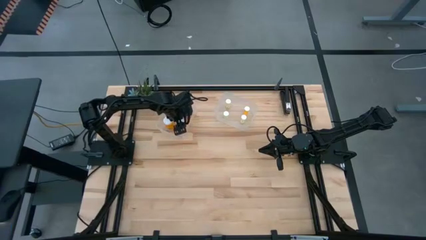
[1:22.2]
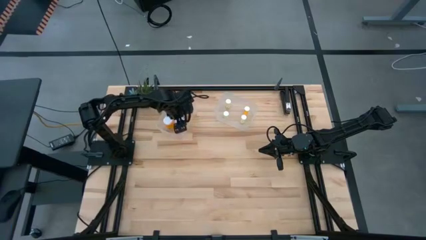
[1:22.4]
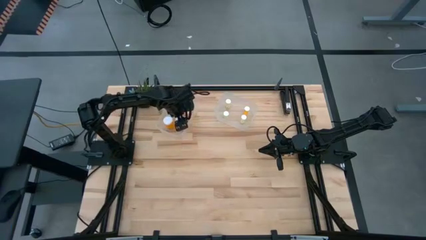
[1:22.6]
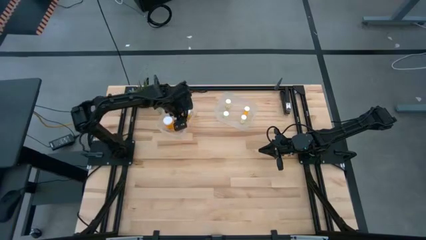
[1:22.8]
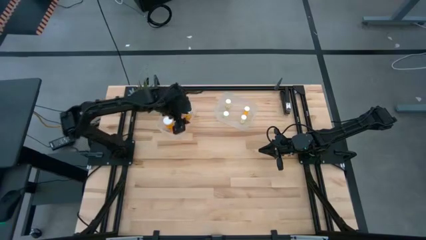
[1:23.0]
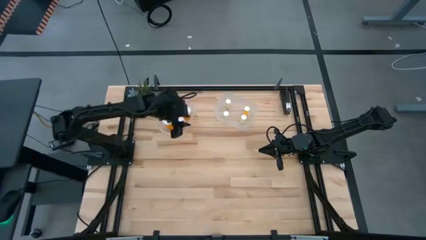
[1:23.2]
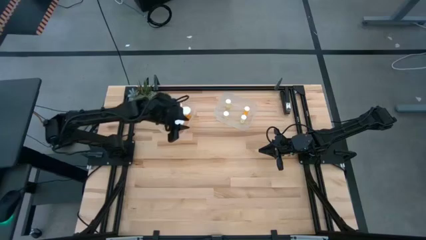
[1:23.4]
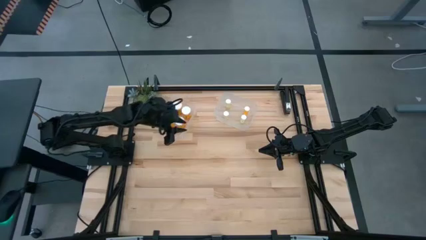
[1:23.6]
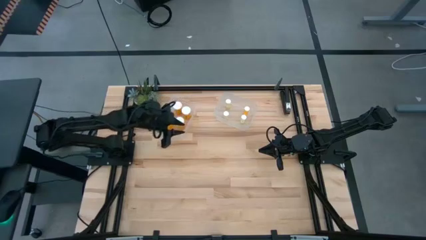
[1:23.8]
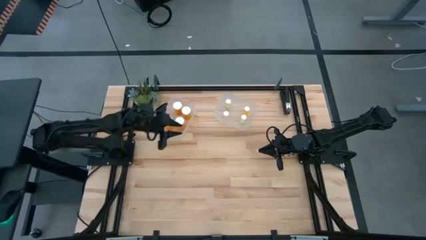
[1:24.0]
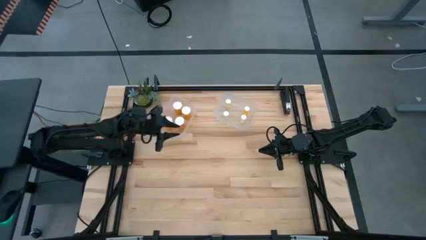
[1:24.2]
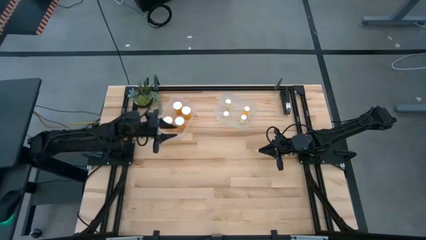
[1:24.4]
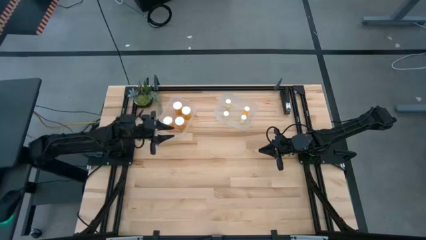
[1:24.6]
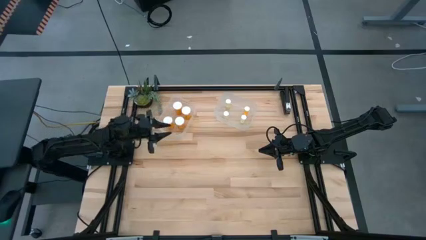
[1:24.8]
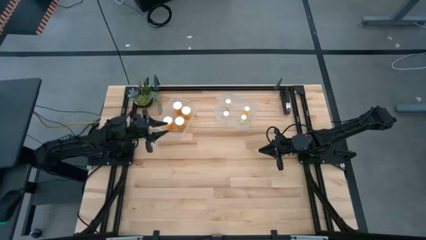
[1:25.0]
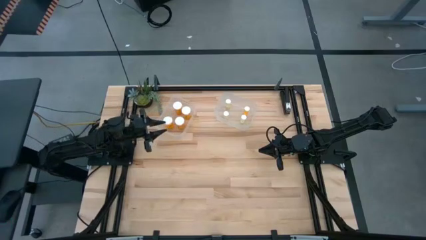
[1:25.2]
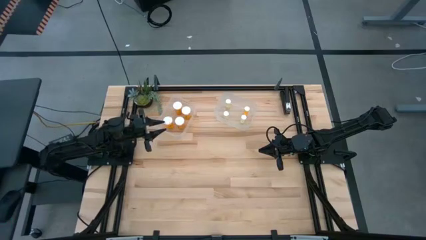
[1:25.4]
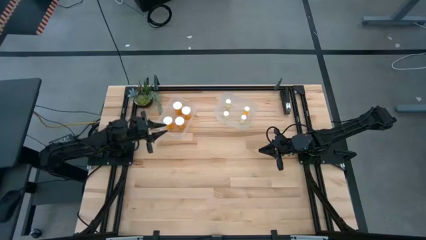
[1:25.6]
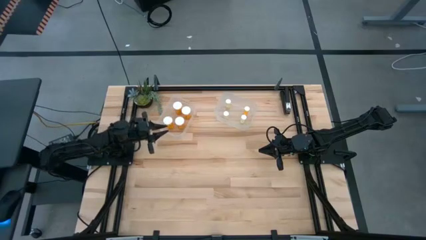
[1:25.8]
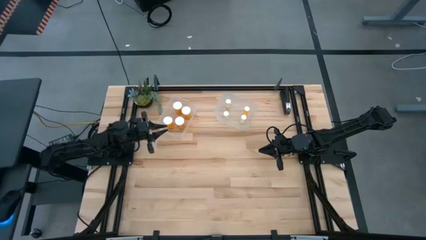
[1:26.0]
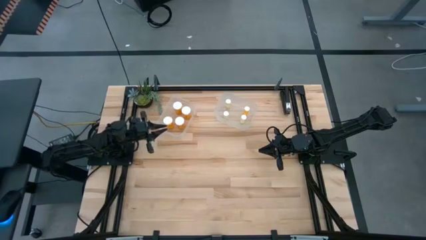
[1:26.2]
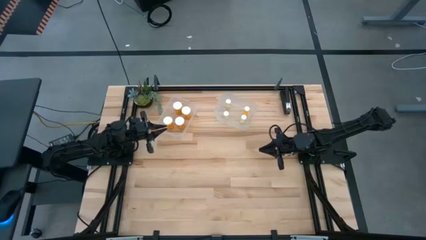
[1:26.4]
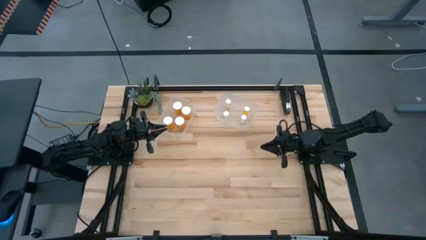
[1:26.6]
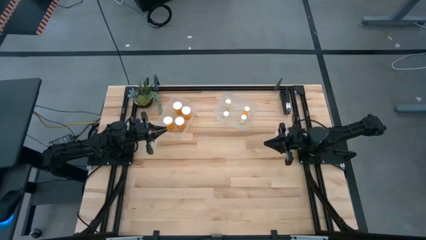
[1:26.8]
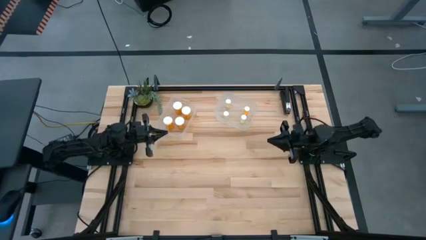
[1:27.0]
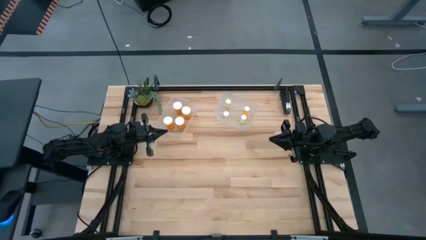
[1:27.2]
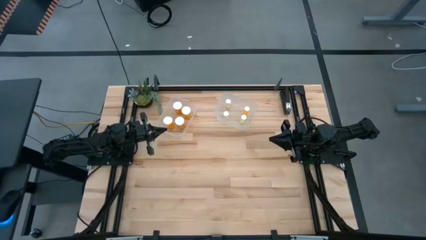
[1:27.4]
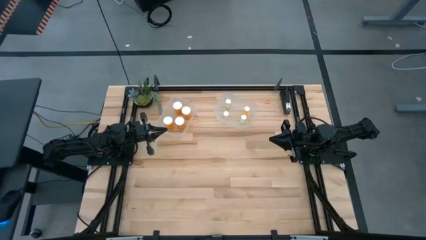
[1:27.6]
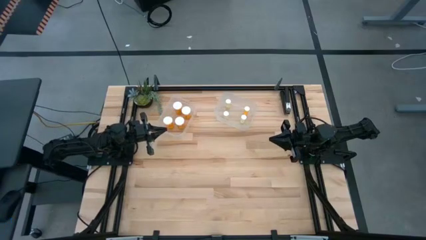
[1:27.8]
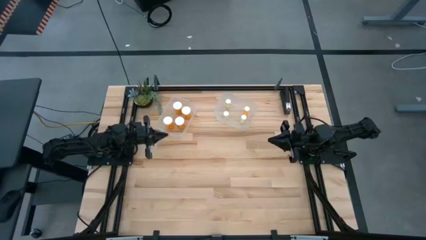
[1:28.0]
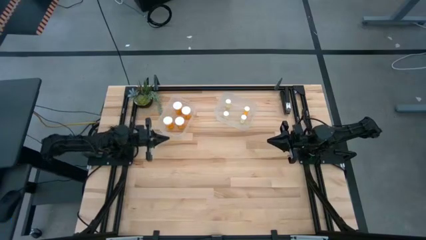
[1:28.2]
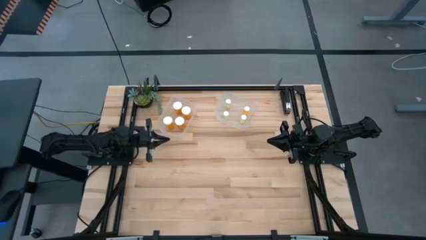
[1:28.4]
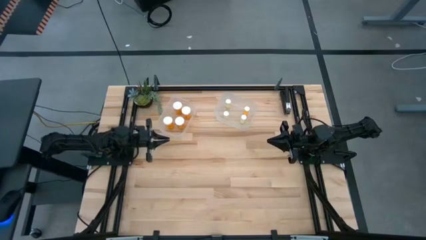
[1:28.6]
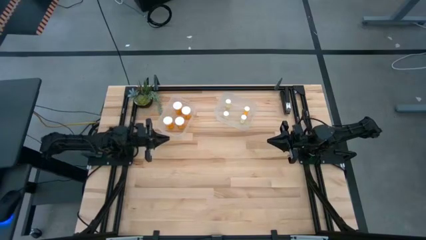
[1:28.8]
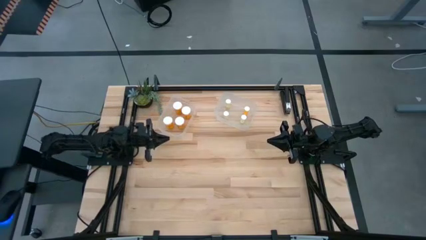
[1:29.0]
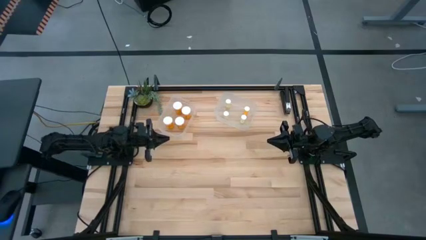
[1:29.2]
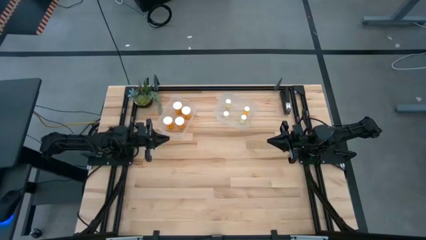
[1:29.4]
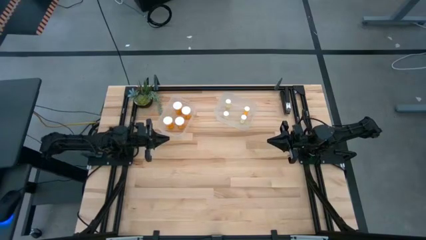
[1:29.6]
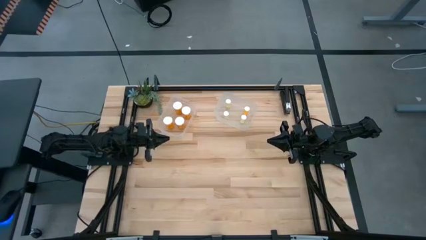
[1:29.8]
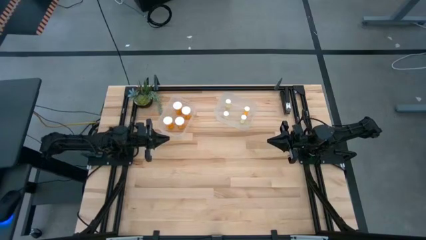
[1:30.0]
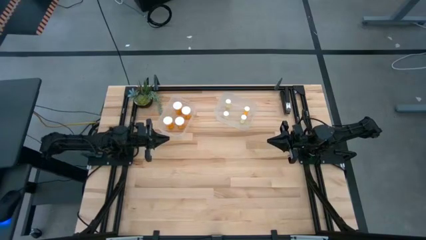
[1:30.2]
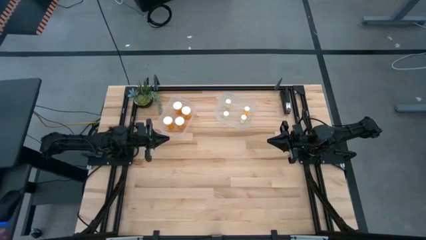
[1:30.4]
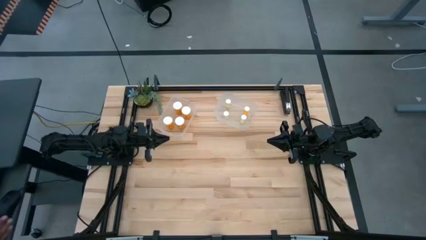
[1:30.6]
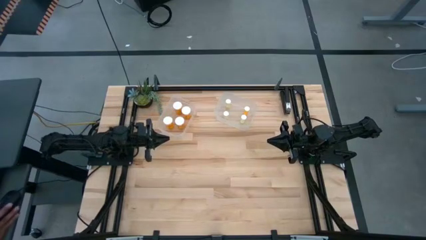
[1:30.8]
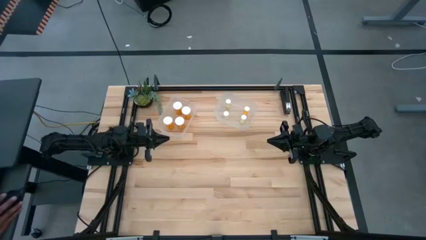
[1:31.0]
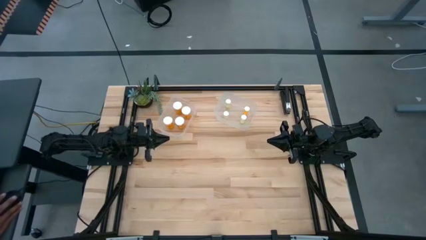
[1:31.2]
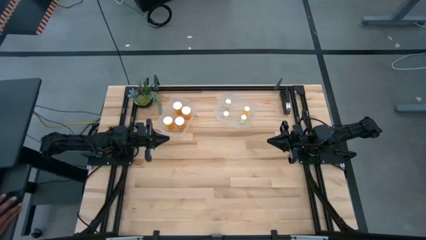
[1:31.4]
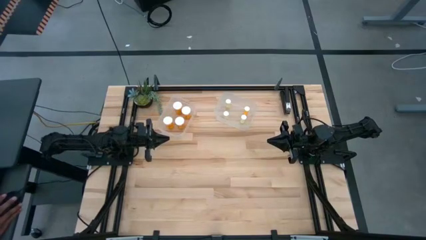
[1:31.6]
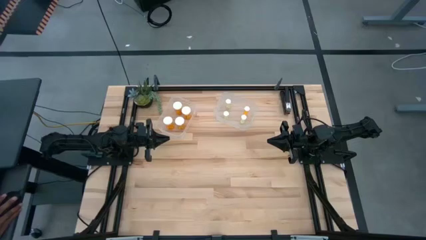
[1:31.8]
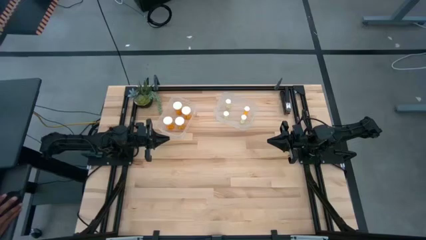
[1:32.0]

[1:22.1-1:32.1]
Task: Pick and place medicine bottles into bin by pill shape (circle, oval)
Return to Home Position
